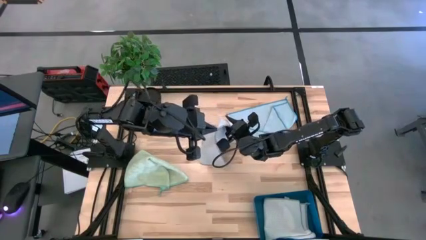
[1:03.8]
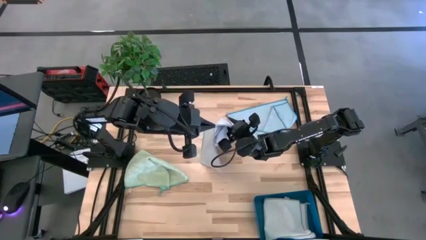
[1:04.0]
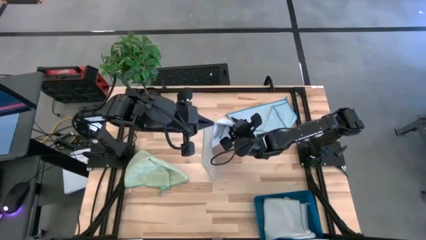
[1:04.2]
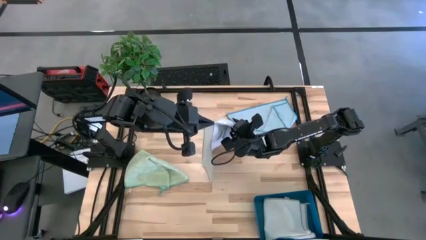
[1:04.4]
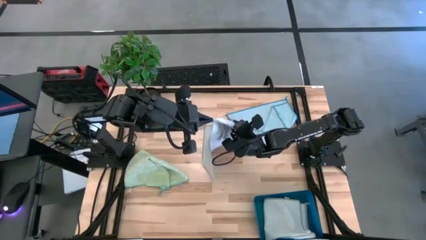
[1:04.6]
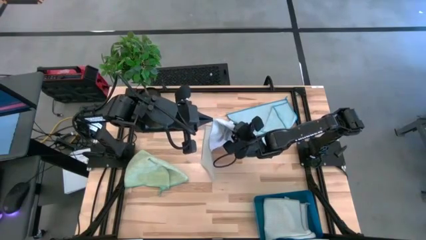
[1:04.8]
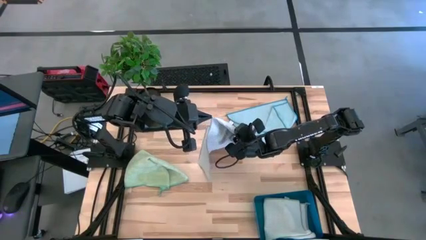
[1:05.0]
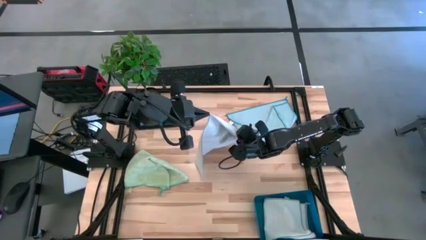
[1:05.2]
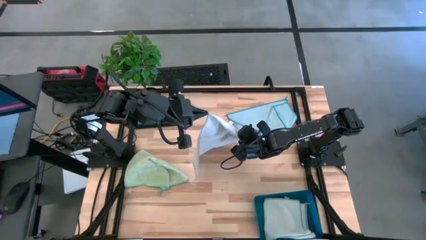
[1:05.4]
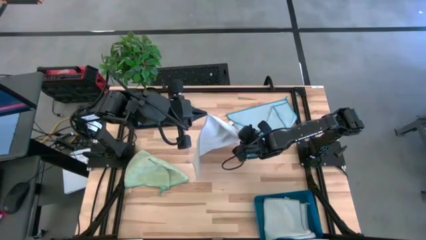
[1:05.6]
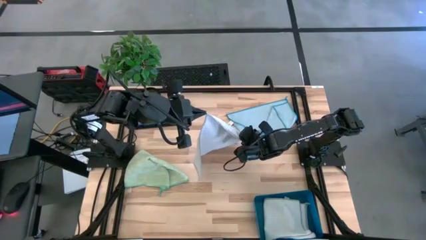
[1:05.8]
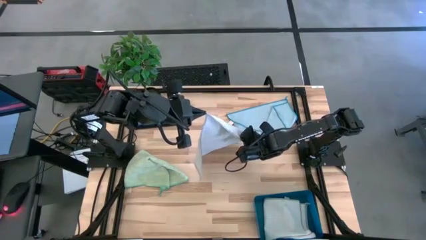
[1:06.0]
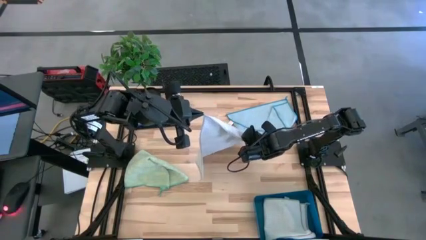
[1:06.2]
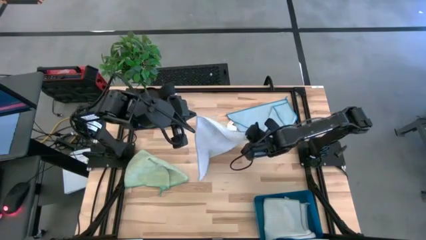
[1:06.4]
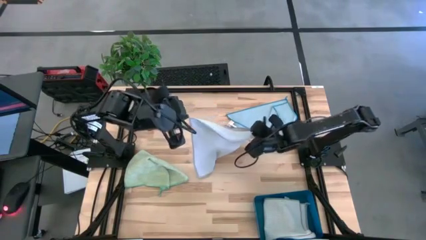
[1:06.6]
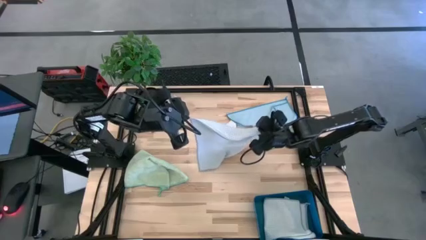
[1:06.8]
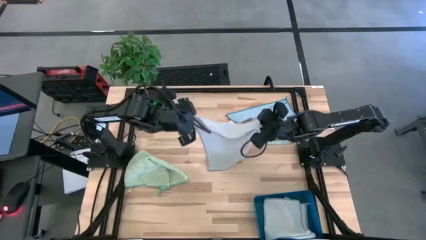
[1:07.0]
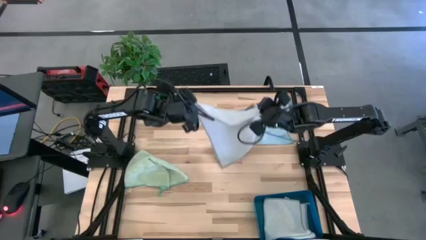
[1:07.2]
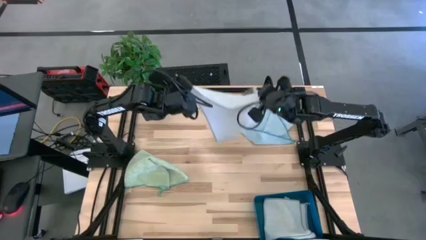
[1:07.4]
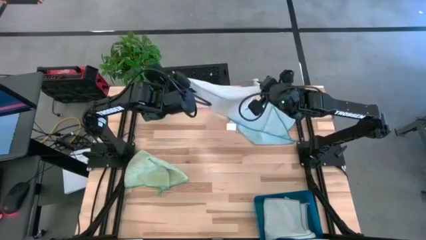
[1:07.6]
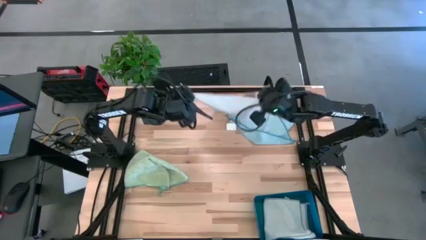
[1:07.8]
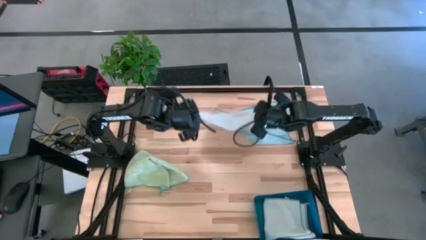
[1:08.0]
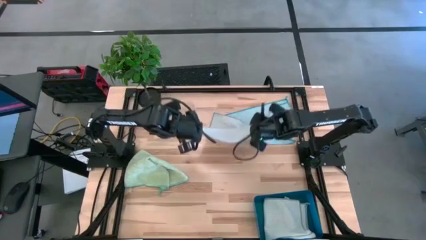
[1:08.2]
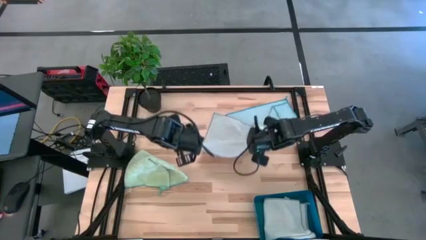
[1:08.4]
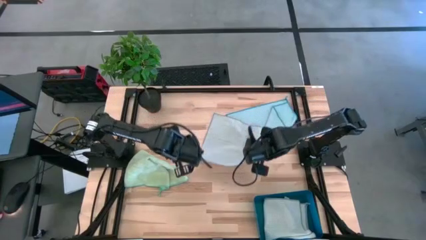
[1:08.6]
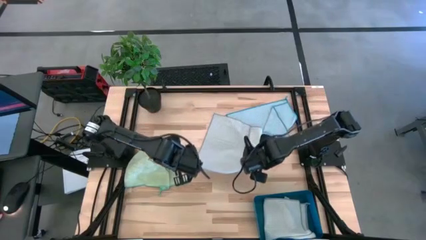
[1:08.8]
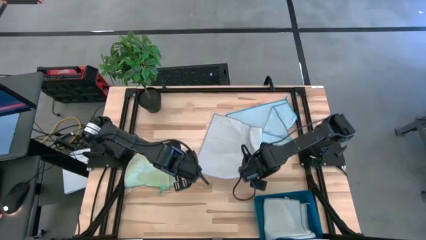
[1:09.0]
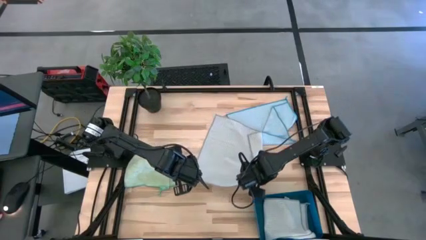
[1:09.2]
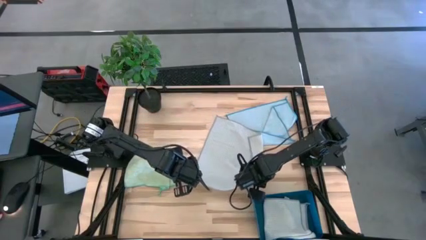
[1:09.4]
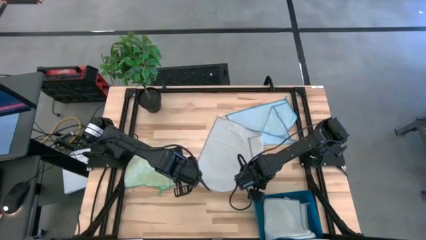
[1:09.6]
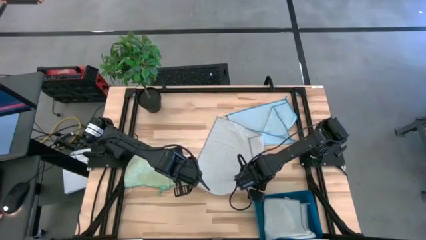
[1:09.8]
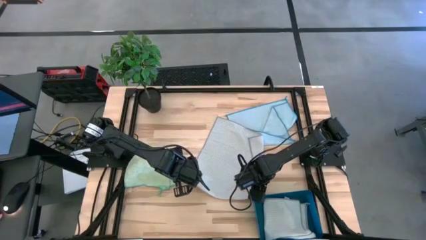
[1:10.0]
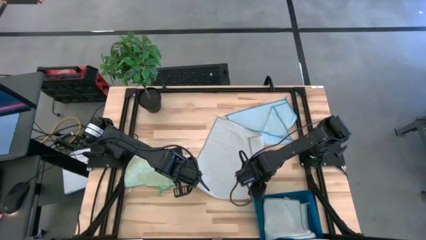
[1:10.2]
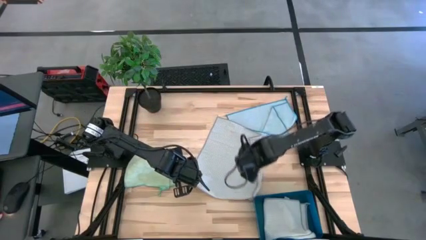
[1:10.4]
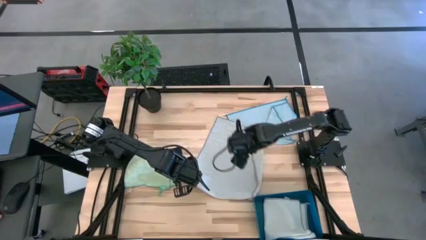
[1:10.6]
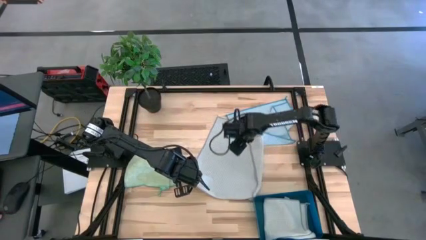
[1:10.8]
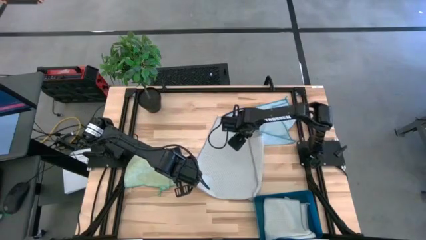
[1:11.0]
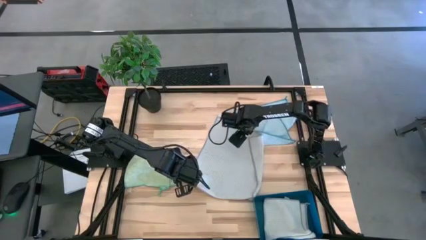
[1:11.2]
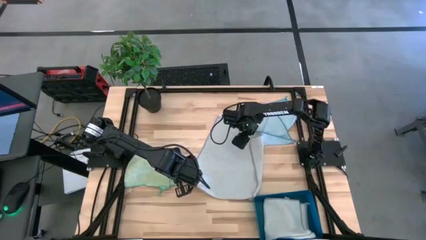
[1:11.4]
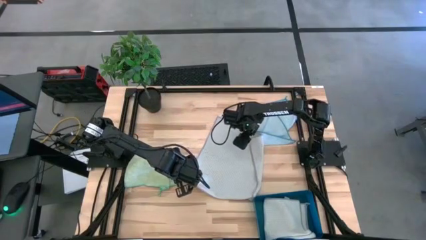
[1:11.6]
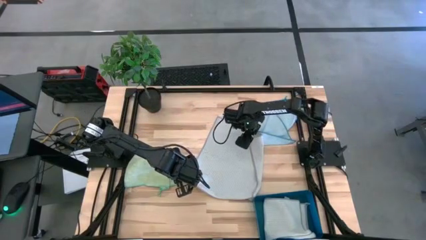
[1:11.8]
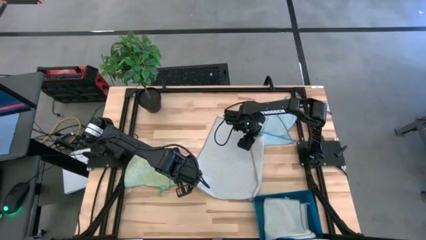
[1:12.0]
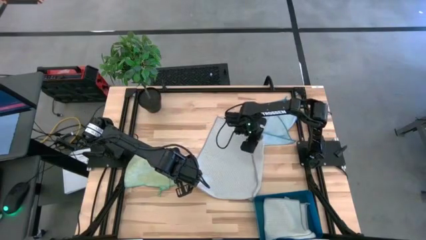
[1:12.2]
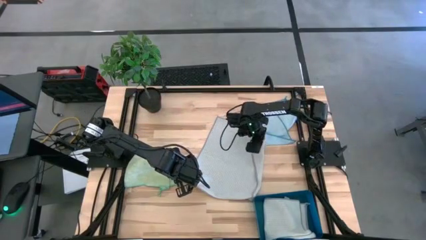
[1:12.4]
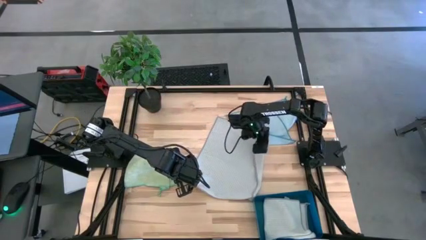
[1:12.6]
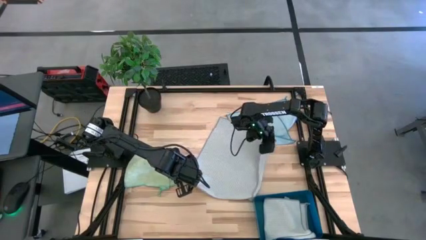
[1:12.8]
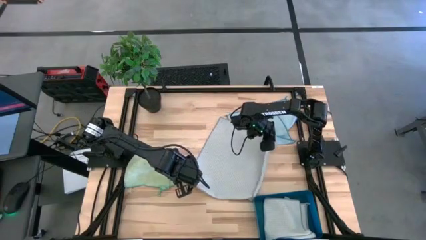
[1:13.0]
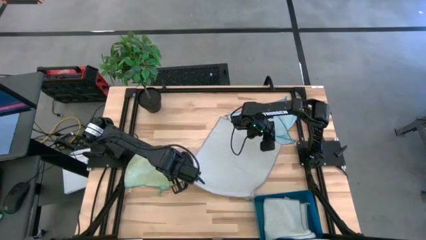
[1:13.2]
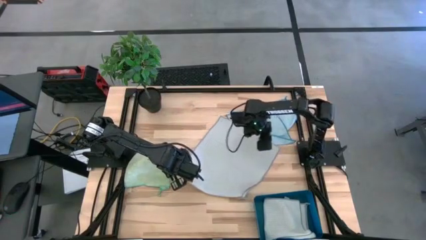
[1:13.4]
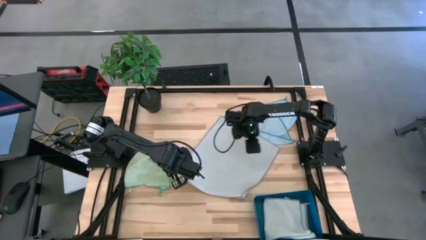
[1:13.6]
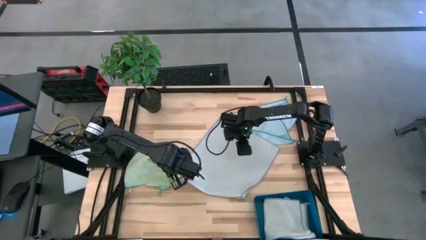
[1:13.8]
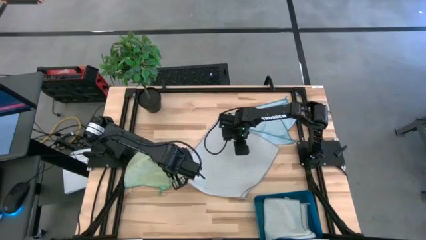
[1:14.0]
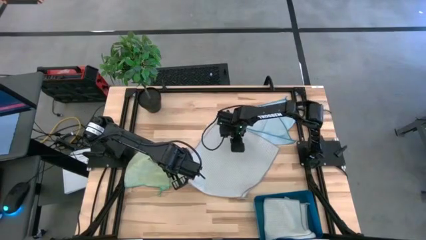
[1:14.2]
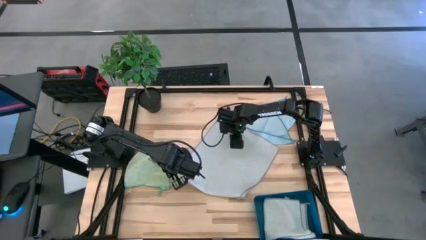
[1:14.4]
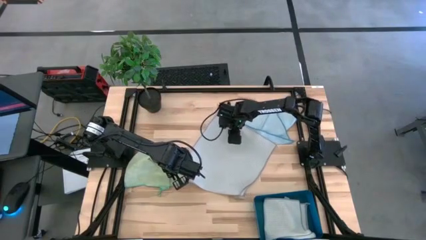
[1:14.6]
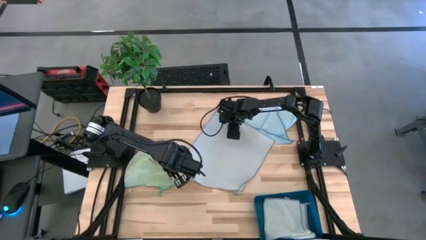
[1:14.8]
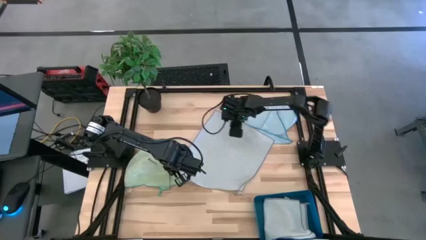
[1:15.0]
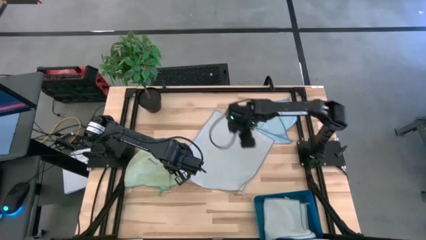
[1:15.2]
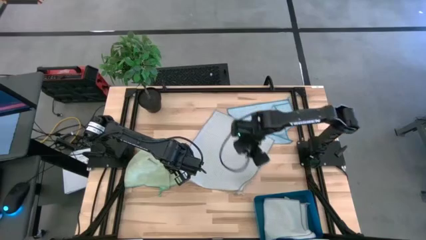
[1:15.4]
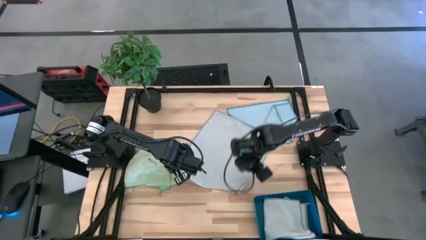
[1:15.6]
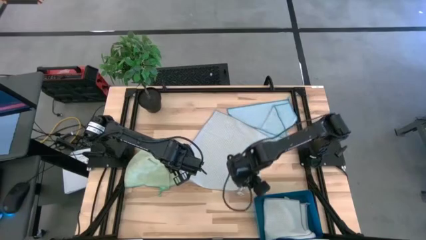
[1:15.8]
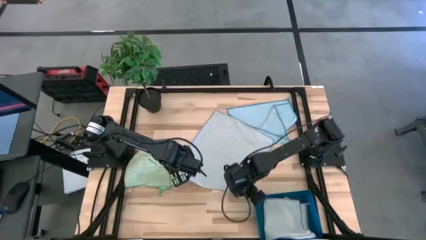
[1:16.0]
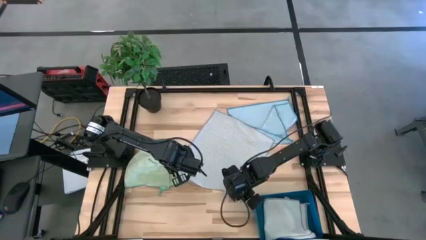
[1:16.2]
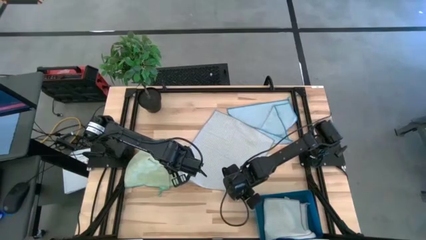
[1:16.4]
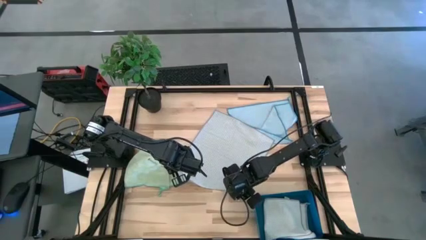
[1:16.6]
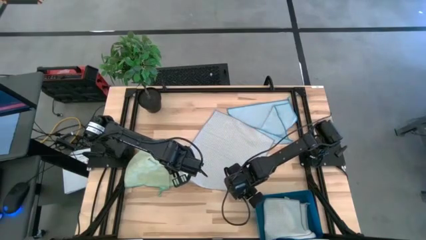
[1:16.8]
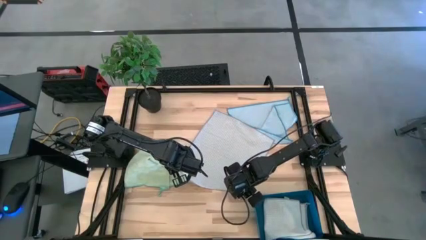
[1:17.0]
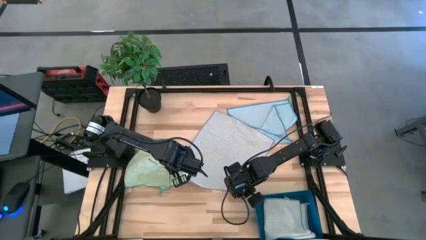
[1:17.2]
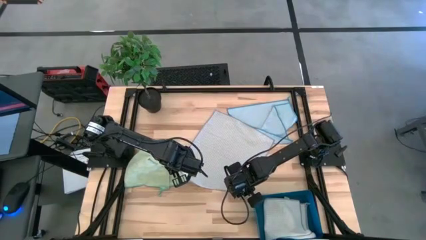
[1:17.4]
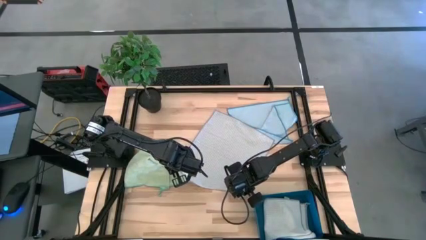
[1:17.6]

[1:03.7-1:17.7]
Task: Fold microfiber towels
Fold the gray microfiber cloth

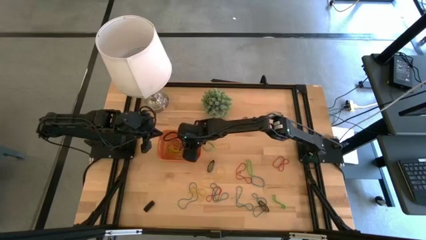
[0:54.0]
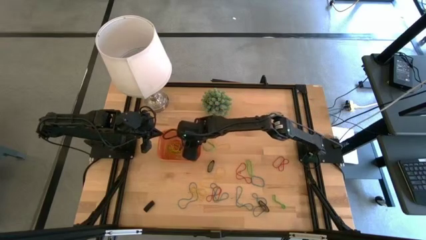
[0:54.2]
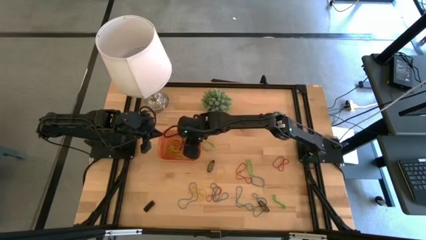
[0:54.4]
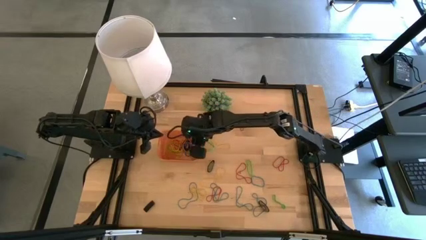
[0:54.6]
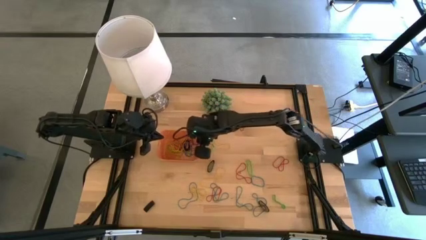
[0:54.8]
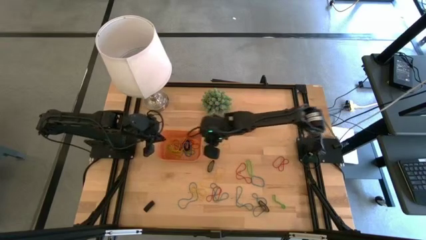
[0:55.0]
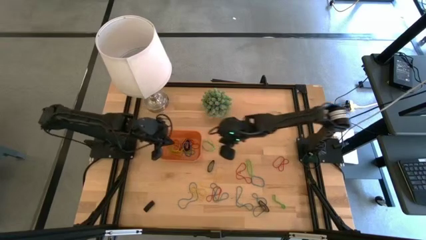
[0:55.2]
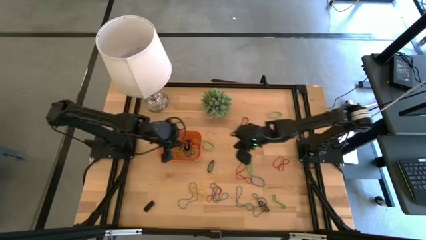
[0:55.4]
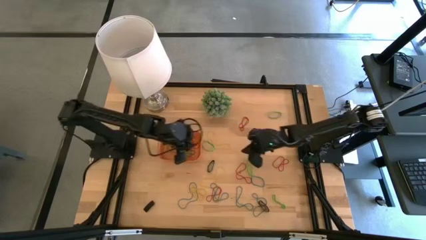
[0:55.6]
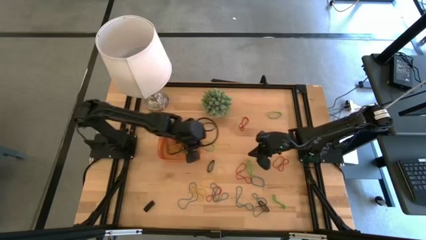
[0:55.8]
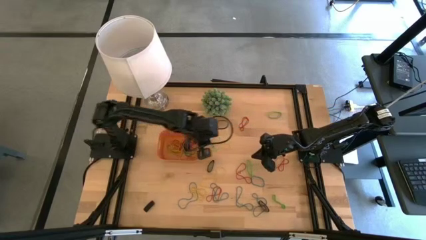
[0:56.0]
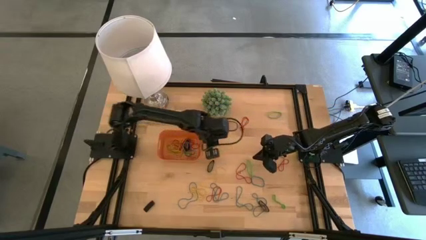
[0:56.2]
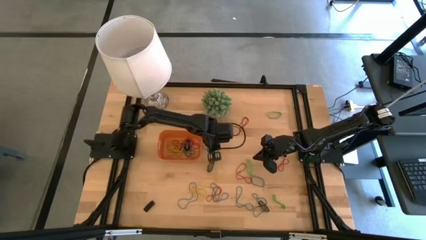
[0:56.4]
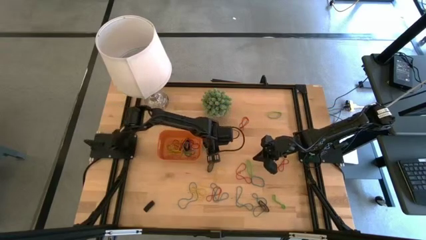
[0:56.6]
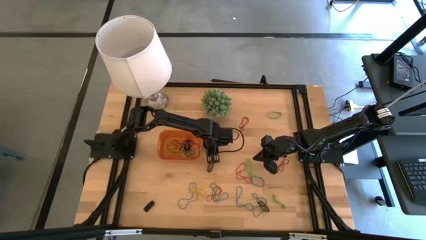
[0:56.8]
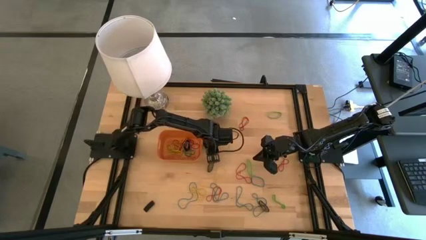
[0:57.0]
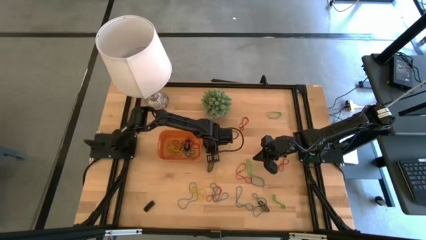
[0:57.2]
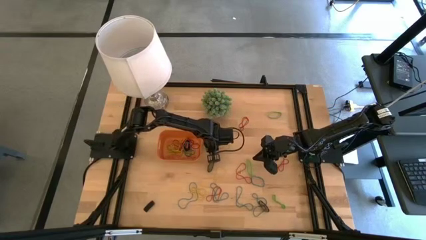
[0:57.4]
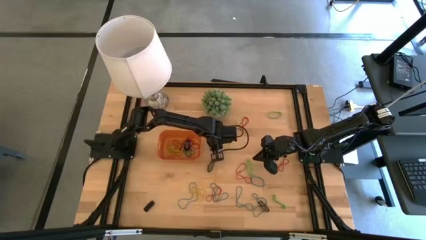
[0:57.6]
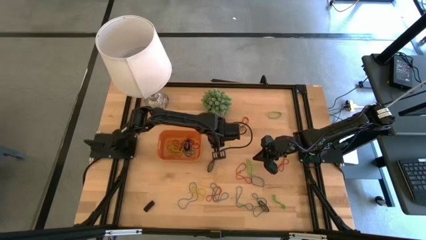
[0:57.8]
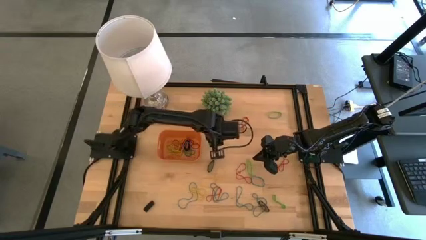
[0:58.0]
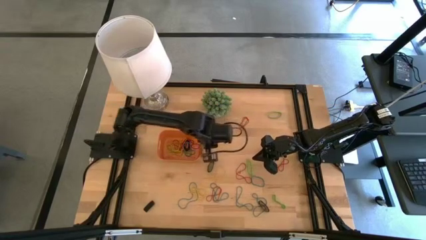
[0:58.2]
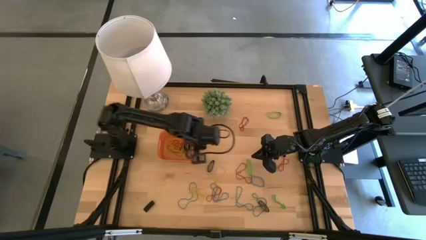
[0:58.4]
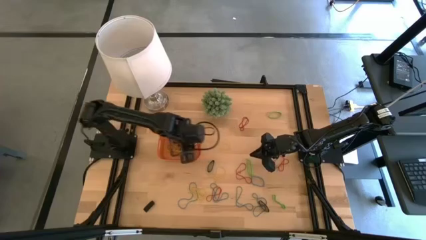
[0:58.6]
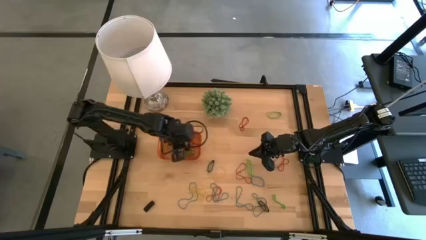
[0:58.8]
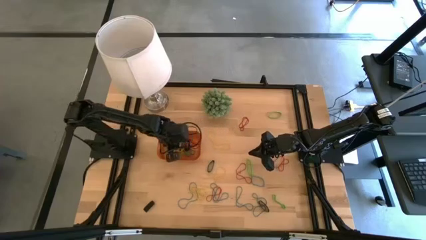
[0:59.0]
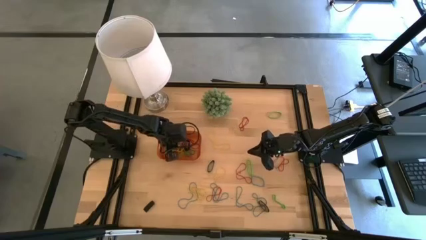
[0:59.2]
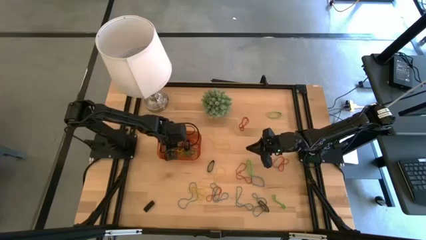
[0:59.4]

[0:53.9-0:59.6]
Task: Pick and place rubber bands into bin
Put the green rubber band into the orange bin
